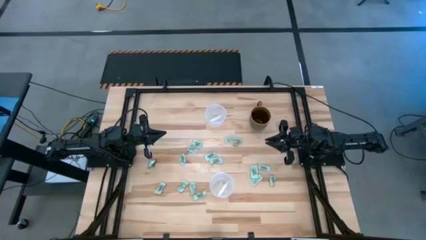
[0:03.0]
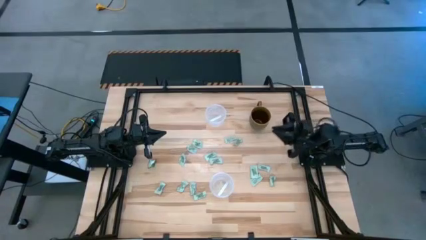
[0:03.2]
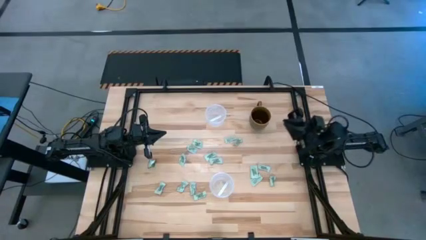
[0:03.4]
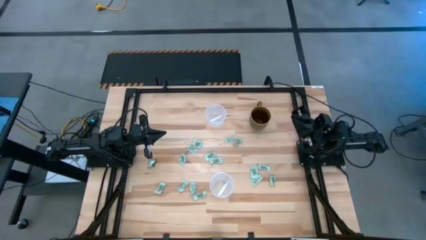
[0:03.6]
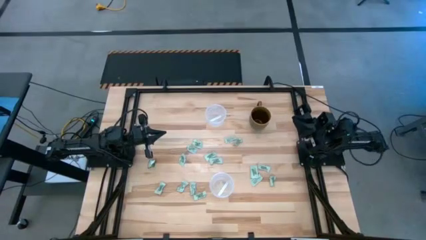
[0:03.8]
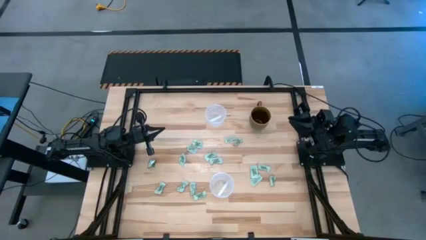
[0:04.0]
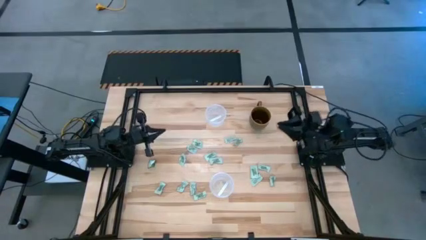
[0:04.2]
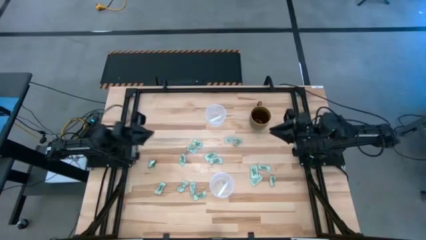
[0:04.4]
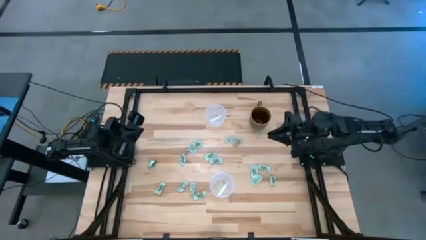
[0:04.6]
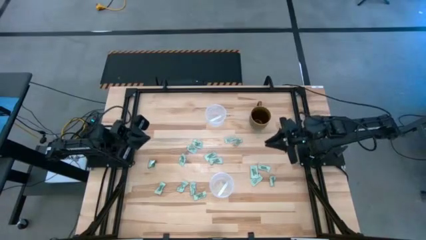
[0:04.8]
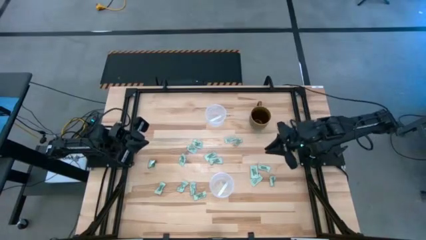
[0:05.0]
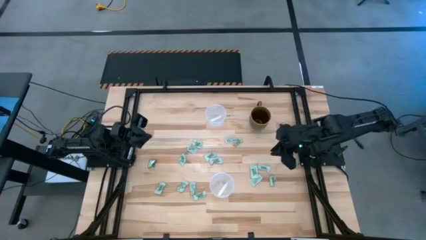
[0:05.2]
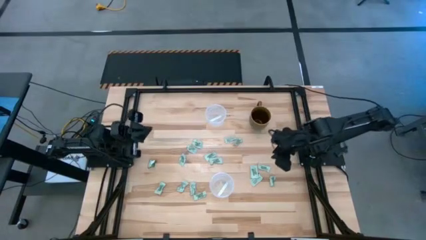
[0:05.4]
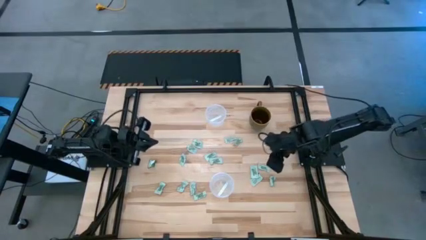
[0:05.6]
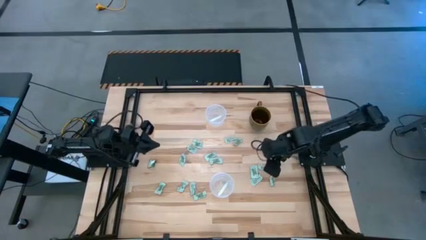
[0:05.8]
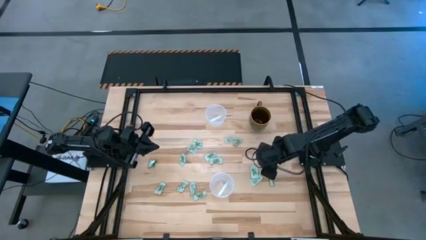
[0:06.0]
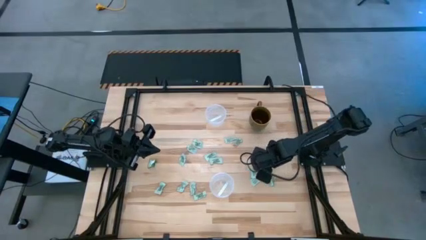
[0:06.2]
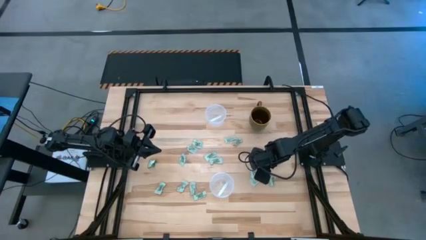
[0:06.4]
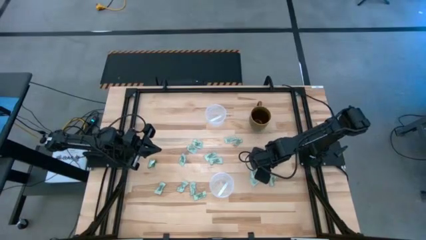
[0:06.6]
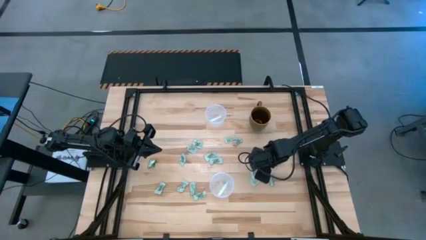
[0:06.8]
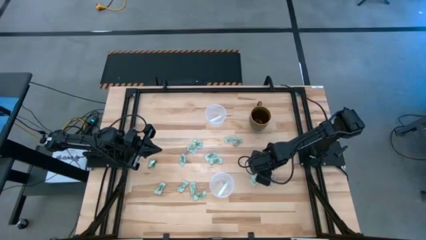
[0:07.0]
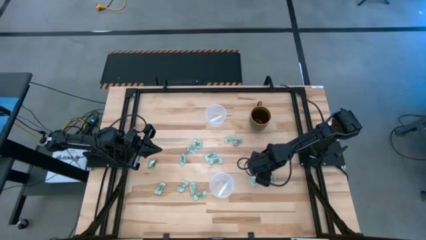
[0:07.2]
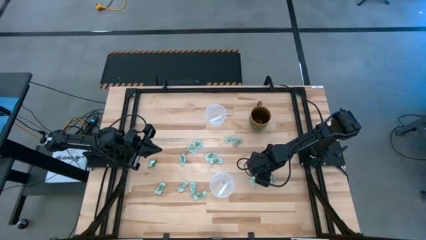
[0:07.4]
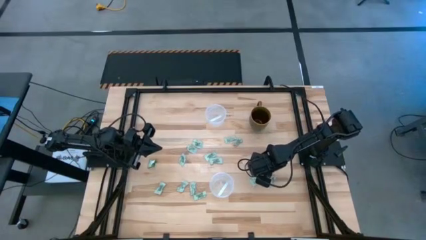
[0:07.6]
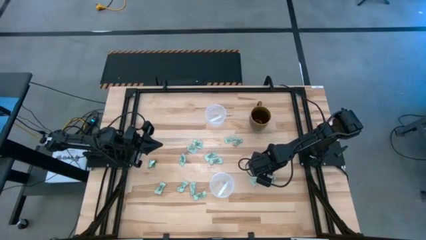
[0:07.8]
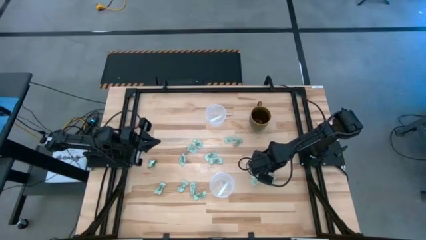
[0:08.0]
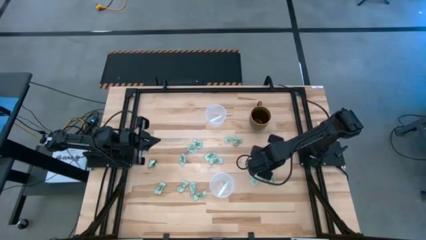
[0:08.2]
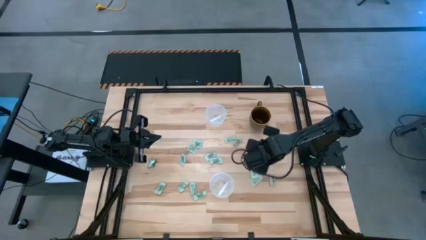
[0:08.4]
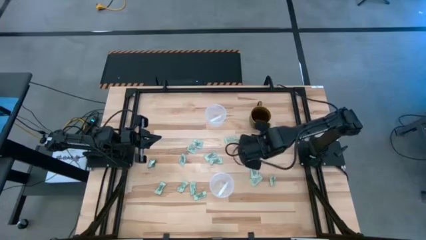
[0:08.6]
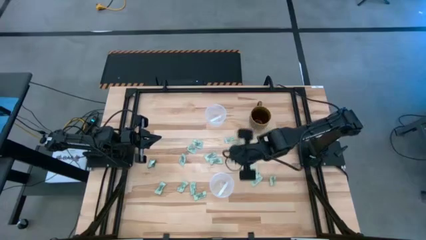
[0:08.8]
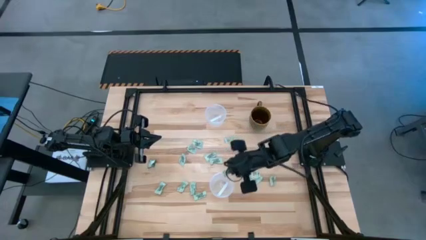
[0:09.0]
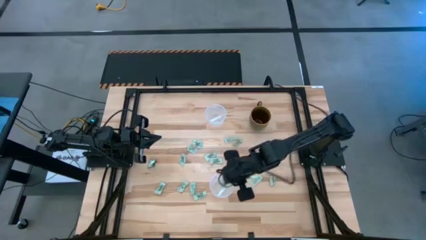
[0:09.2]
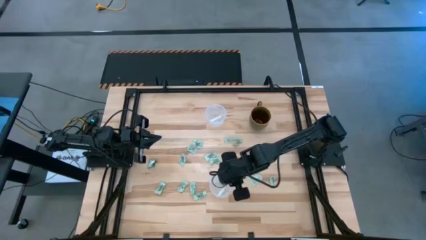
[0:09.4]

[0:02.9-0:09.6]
Task: Pick and place Stevia / Truvia into bins
Put the stevia packet into the bottom transparent container

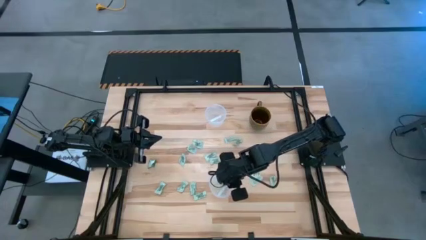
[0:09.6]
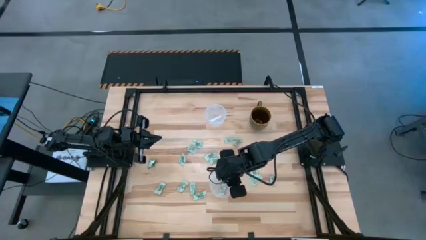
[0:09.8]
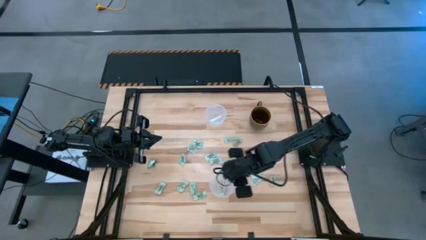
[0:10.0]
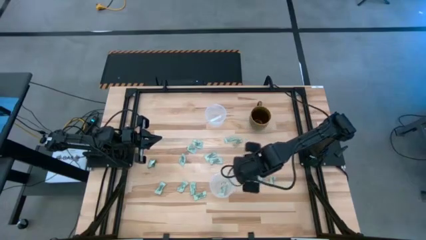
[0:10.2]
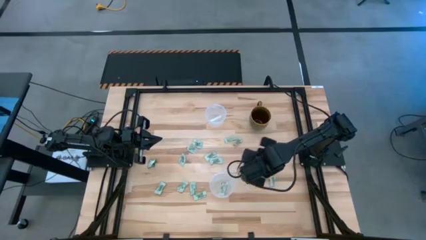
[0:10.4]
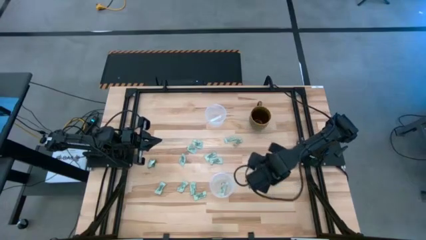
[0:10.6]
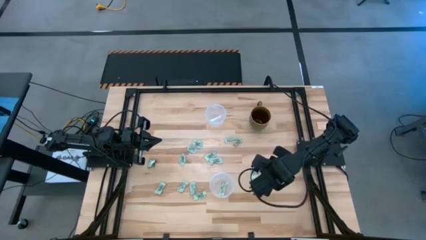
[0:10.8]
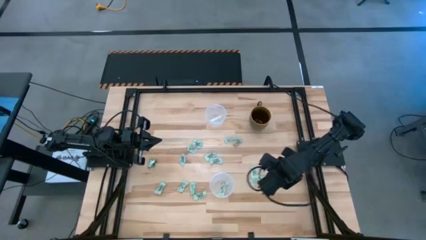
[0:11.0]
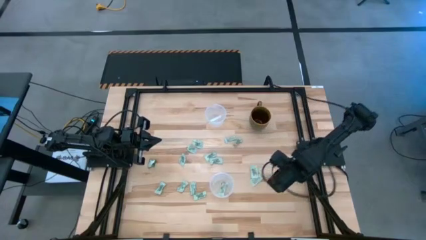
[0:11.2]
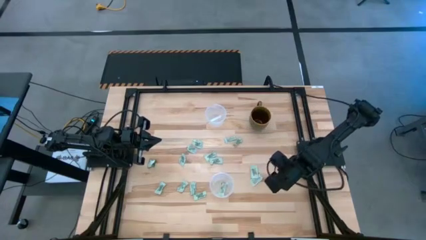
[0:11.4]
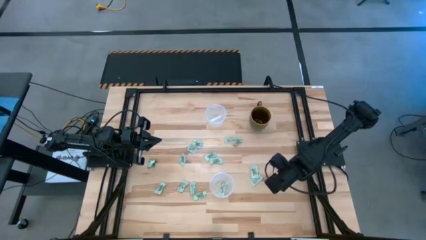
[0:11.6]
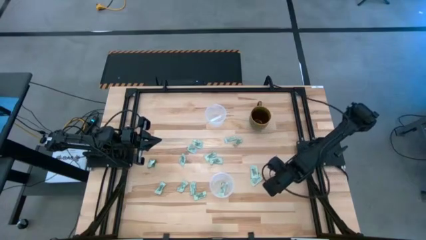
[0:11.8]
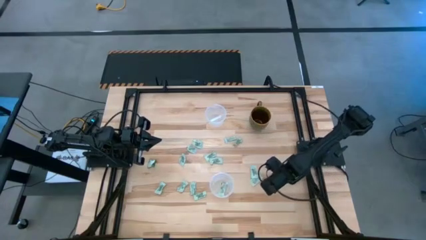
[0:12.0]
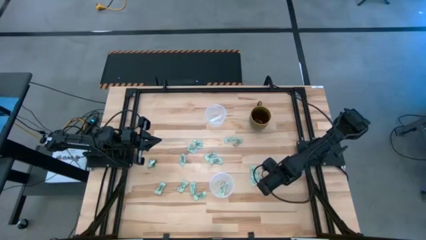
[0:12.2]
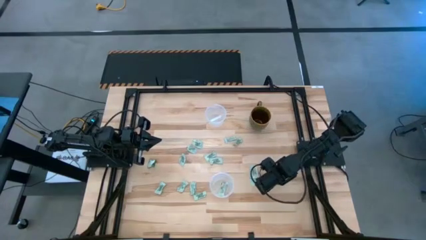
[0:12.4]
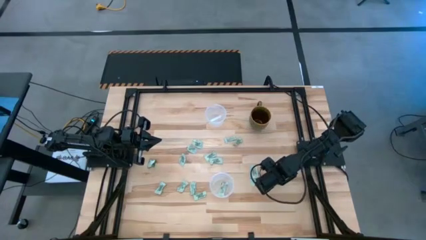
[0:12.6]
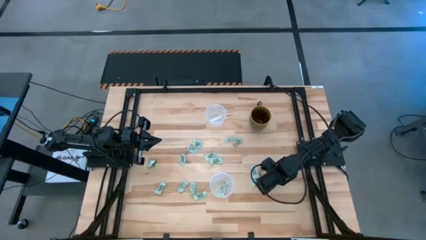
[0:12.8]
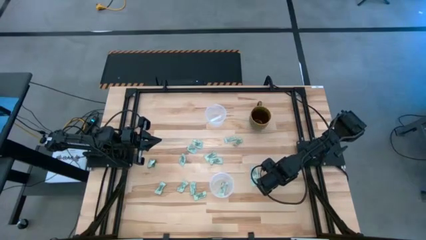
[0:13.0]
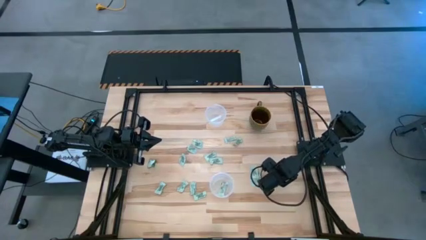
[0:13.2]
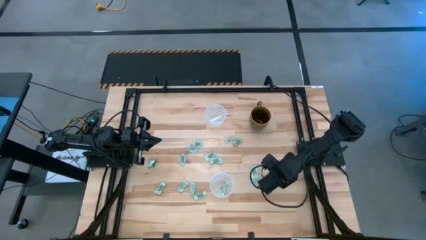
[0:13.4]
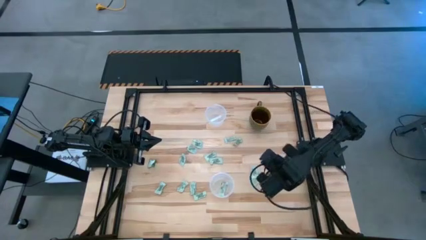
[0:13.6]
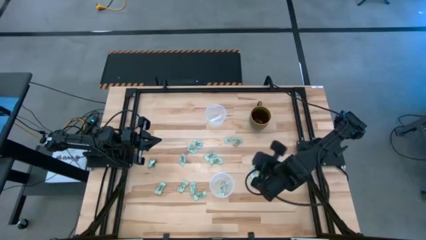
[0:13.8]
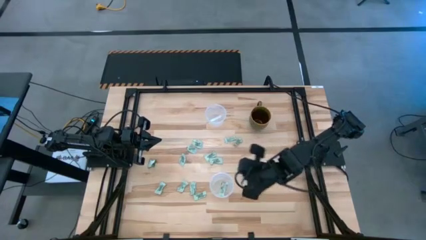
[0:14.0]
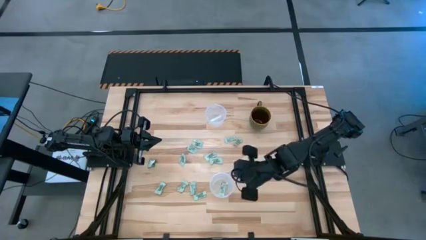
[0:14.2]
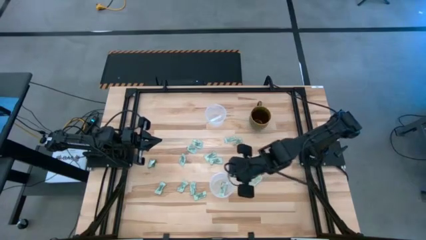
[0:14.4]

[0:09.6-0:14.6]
Put the stevia packet into the bottom transparent container

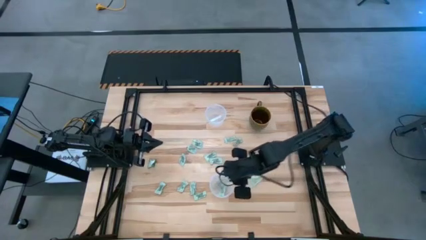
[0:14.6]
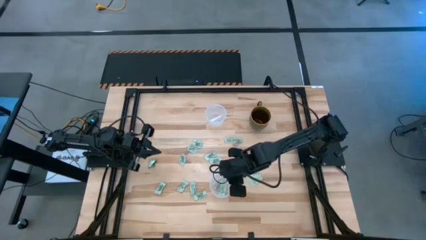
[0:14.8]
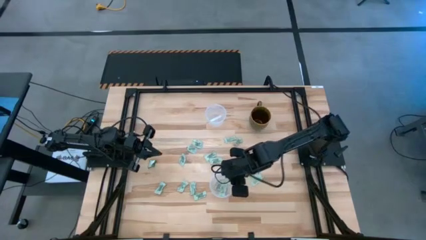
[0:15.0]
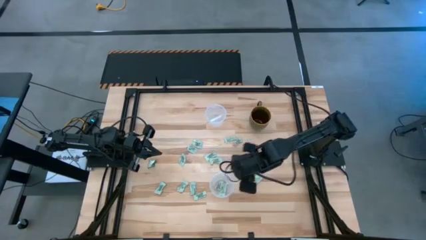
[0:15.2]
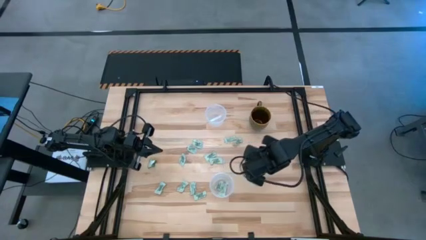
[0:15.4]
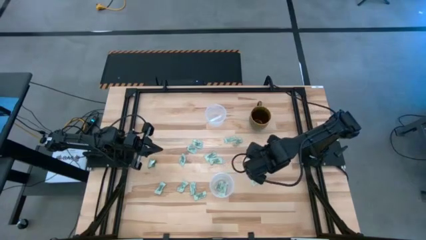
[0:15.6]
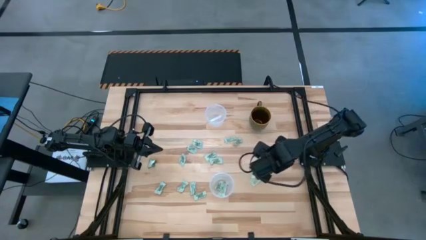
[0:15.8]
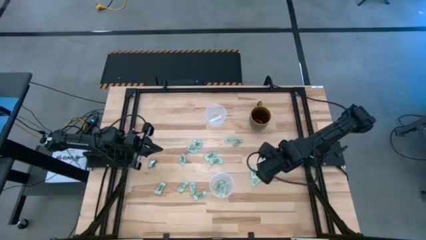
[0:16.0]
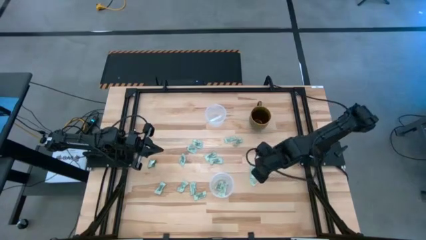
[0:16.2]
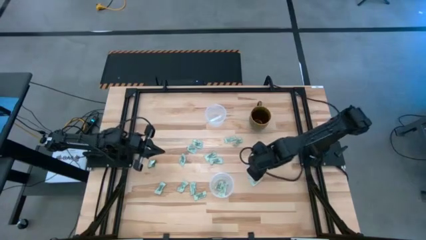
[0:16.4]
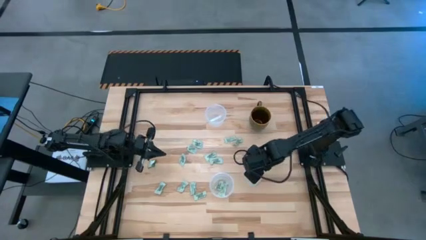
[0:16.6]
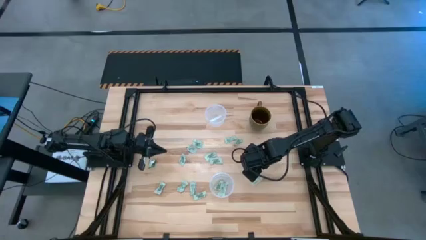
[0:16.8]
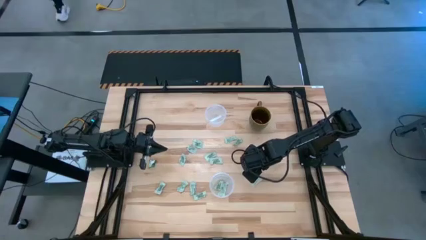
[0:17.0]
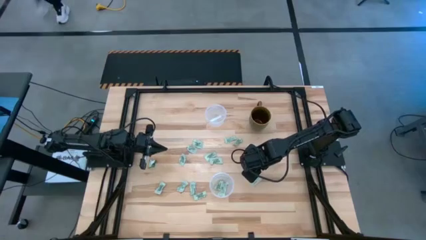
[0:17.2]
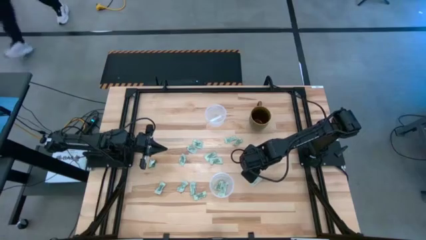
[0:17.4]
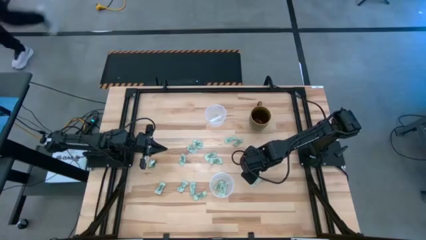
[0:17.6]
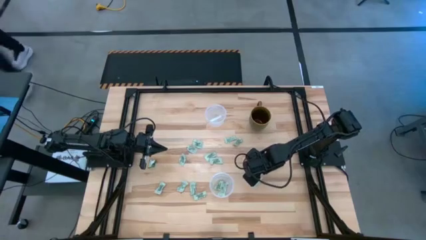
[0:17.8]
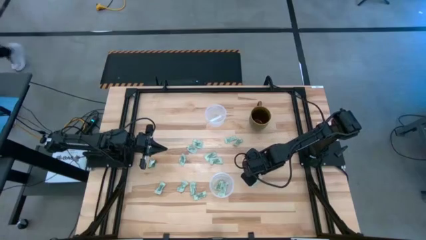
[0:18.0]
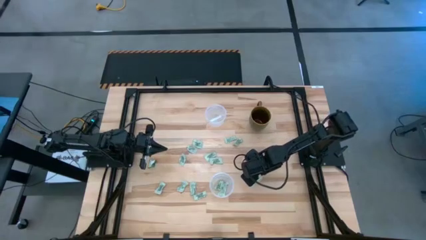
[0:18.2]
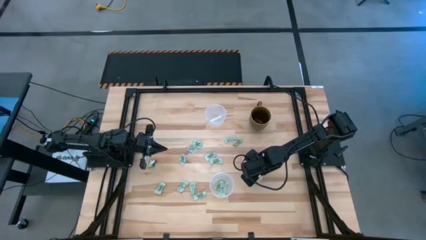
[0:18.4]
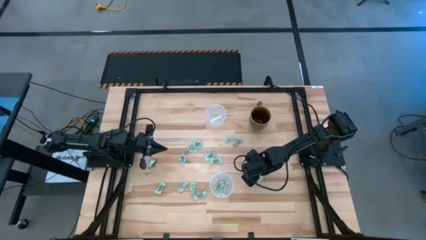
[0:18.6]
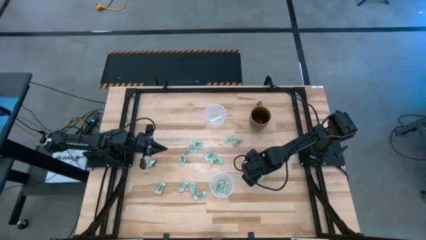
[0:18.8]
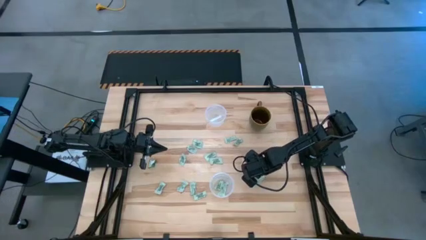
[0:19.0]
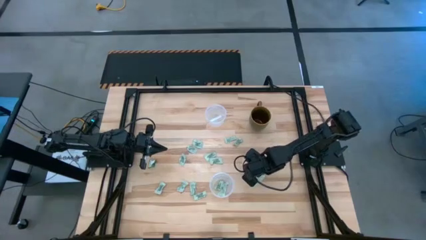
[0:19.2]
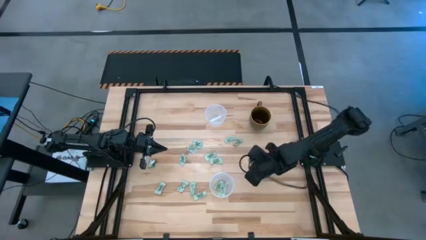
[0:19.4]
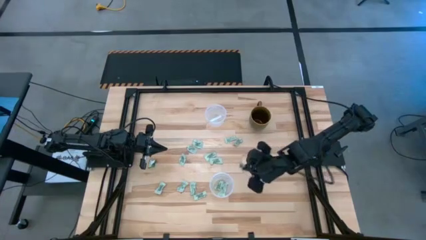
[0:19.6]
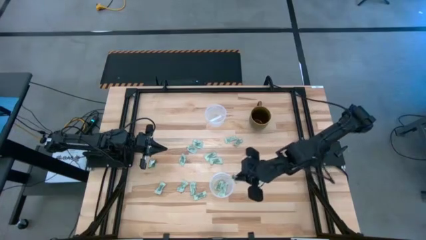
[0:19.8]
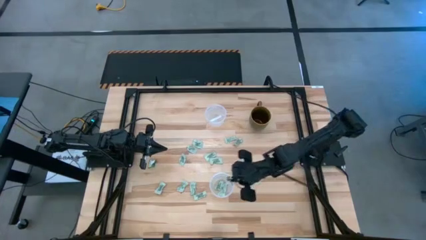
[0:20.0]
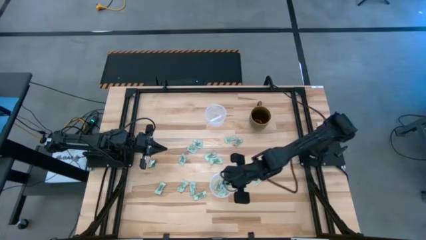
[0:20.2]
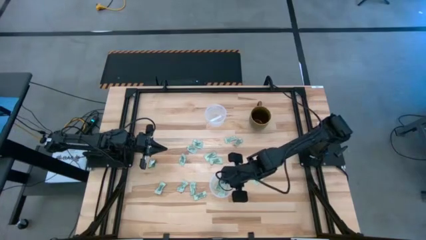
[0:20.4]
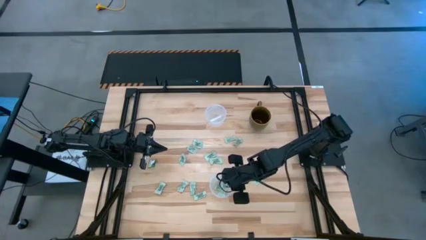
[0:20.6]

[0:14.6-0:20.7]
Put the stevia packet into the bottom transparent container
